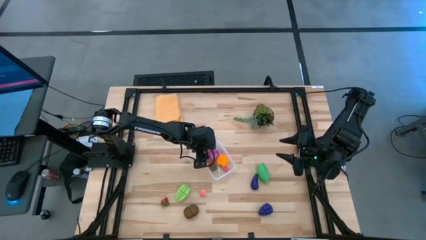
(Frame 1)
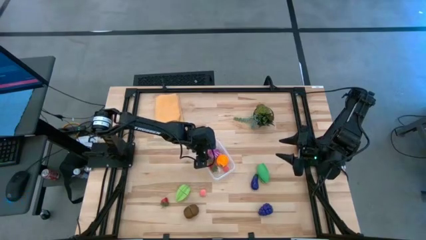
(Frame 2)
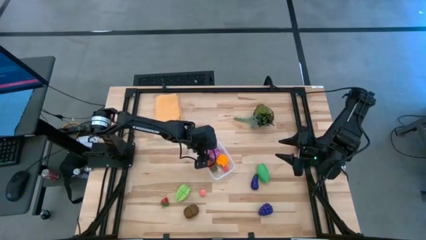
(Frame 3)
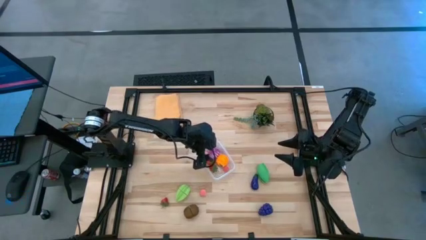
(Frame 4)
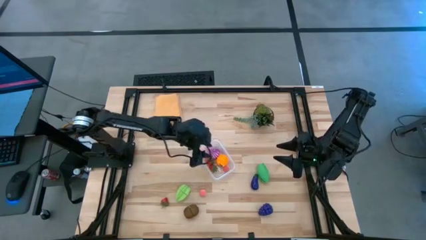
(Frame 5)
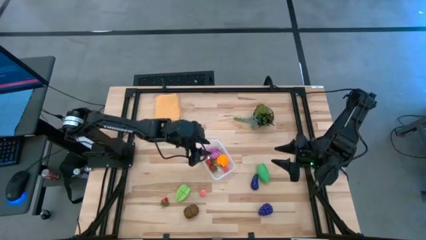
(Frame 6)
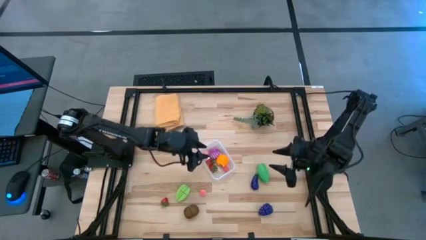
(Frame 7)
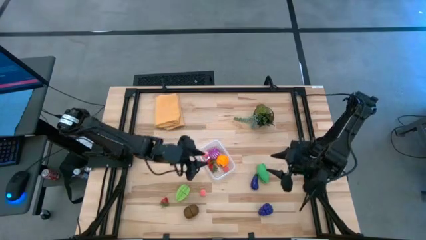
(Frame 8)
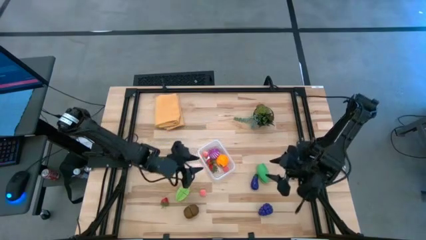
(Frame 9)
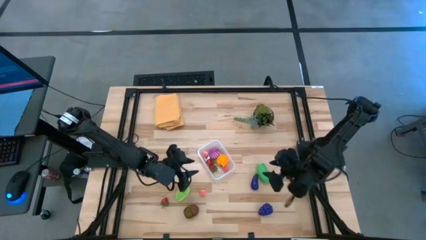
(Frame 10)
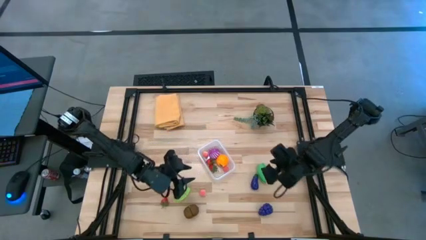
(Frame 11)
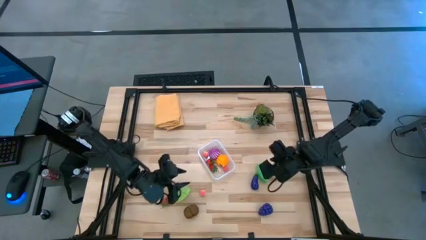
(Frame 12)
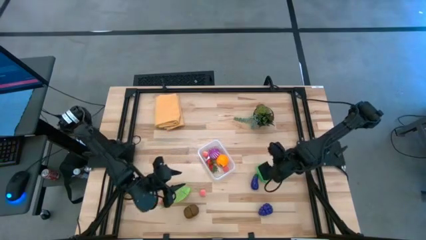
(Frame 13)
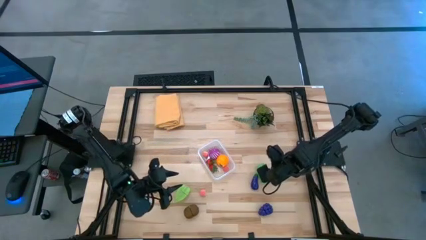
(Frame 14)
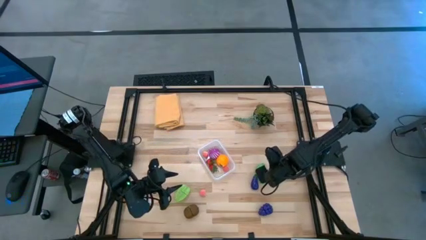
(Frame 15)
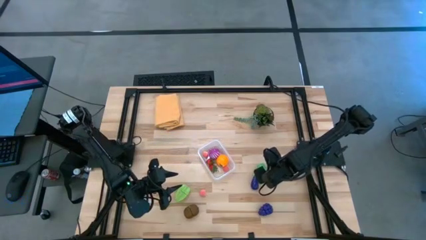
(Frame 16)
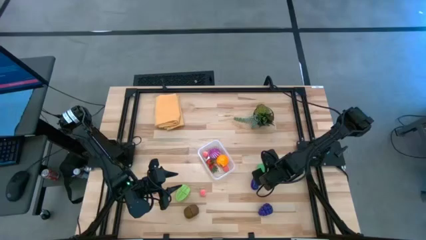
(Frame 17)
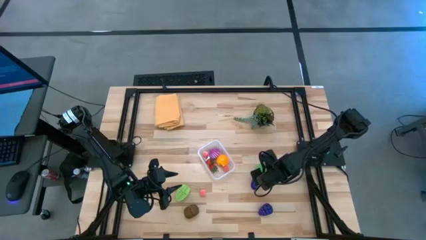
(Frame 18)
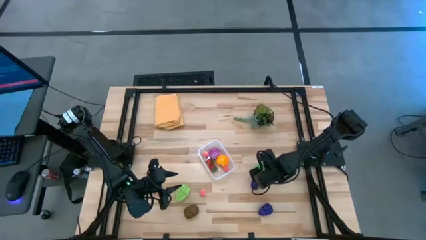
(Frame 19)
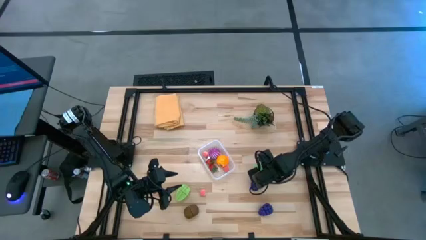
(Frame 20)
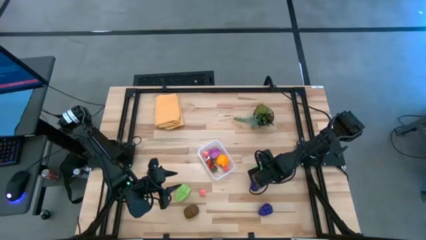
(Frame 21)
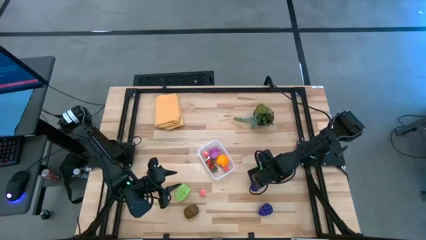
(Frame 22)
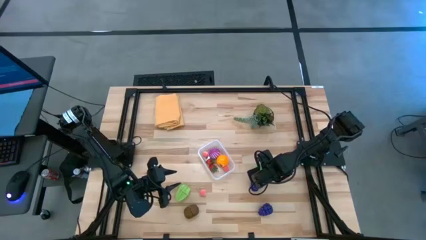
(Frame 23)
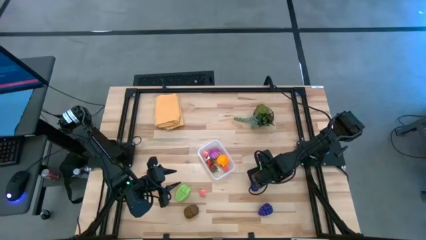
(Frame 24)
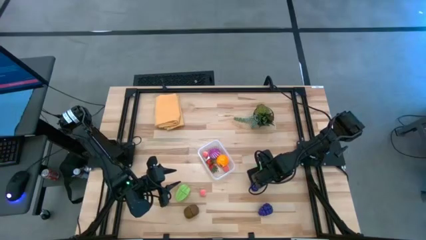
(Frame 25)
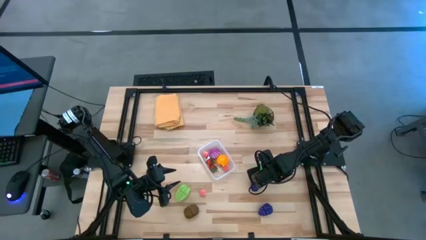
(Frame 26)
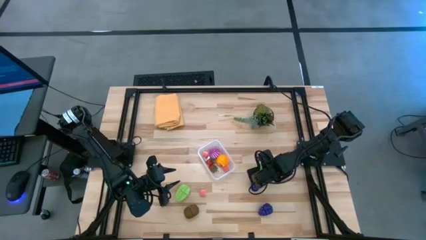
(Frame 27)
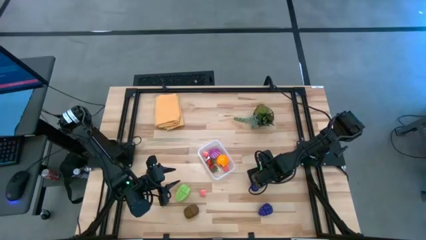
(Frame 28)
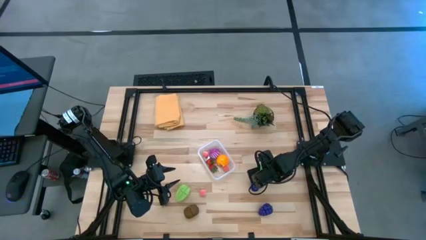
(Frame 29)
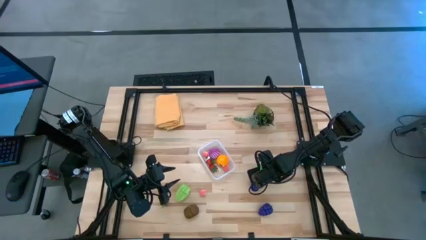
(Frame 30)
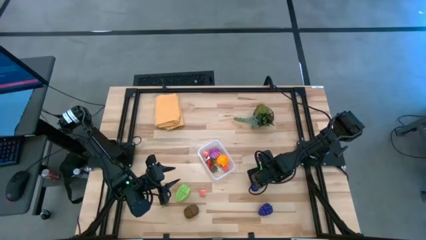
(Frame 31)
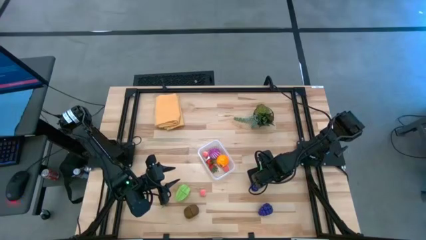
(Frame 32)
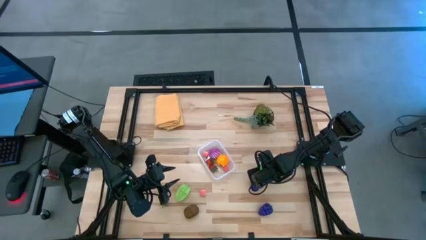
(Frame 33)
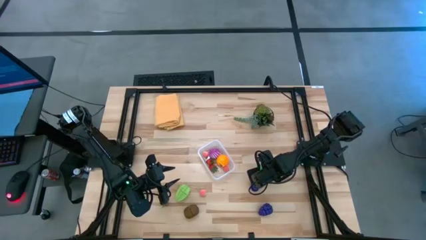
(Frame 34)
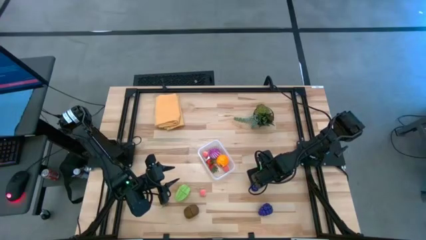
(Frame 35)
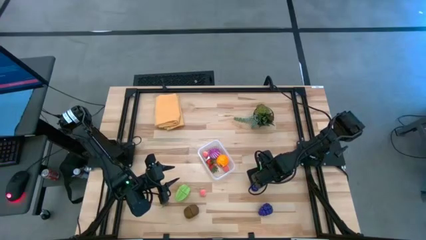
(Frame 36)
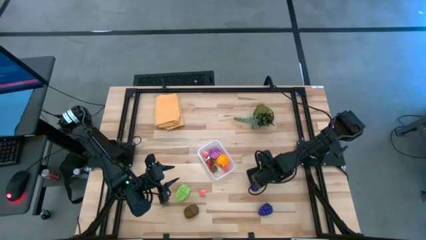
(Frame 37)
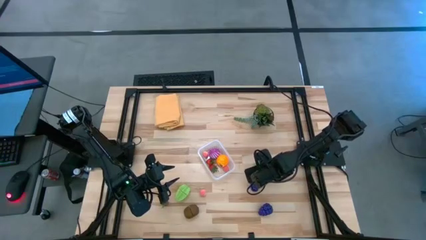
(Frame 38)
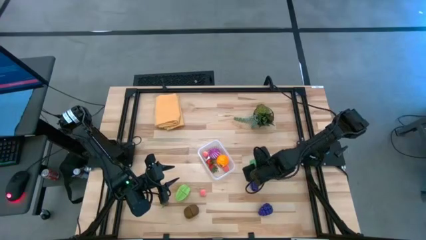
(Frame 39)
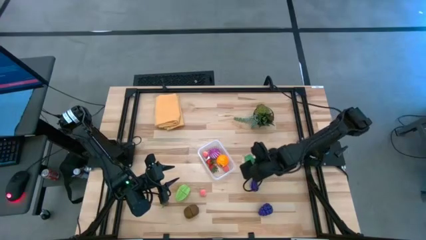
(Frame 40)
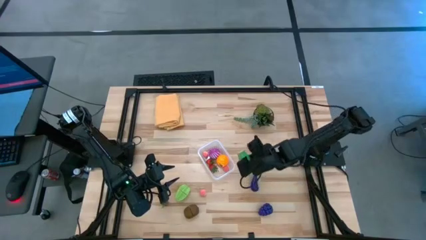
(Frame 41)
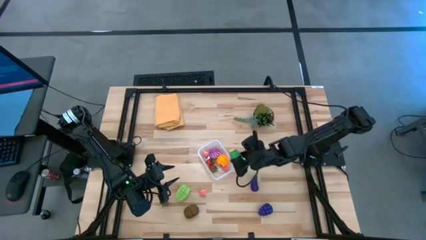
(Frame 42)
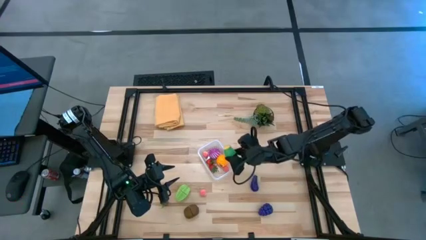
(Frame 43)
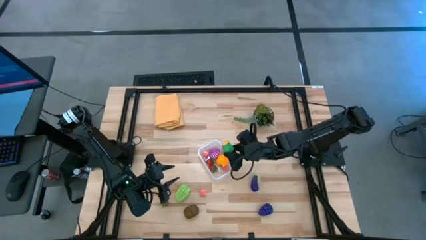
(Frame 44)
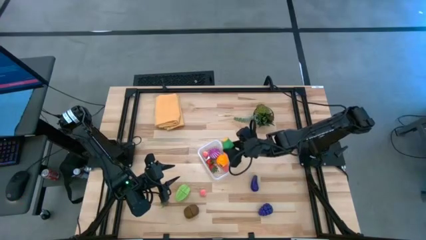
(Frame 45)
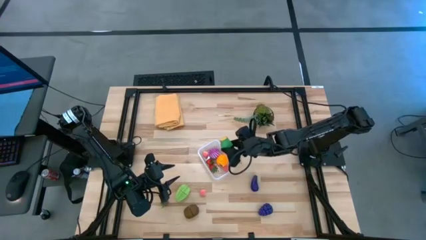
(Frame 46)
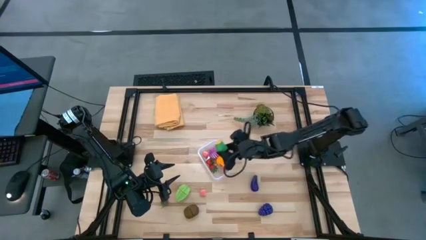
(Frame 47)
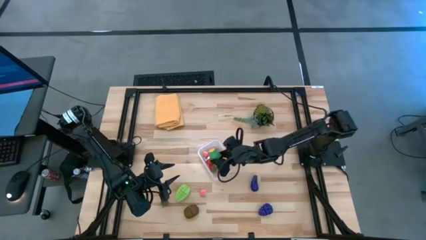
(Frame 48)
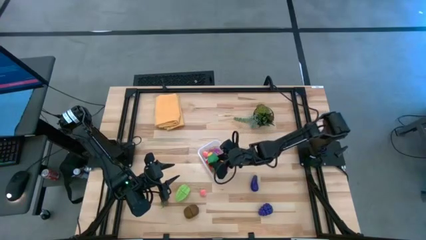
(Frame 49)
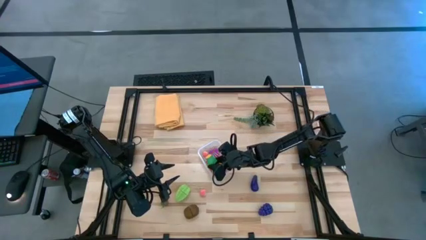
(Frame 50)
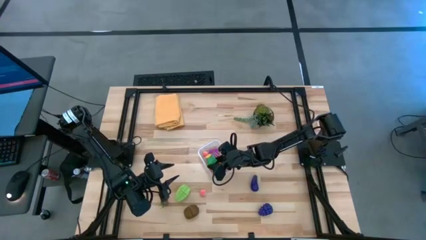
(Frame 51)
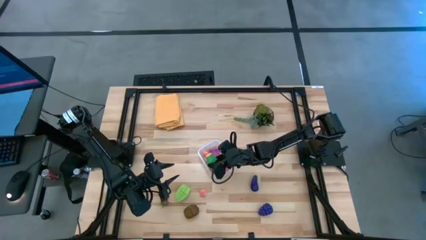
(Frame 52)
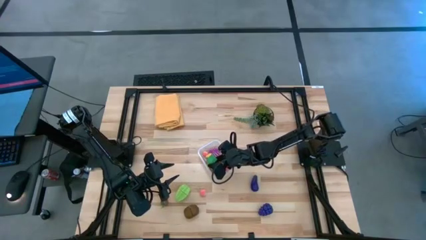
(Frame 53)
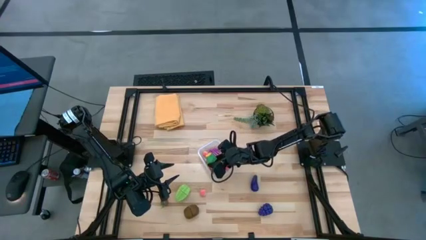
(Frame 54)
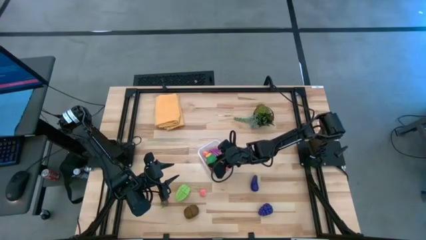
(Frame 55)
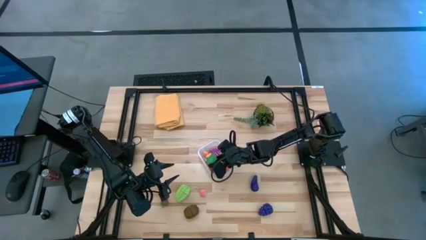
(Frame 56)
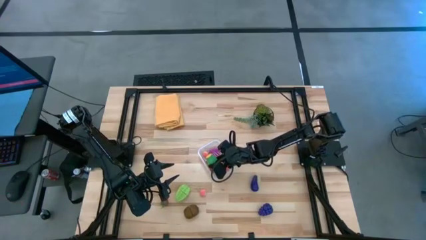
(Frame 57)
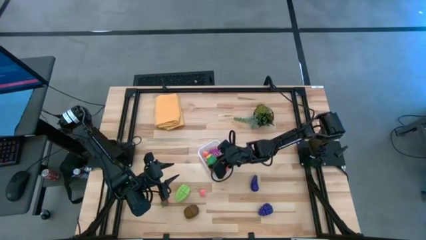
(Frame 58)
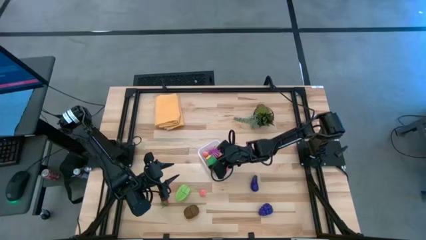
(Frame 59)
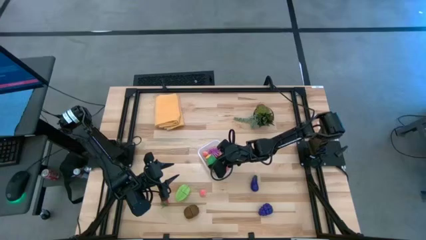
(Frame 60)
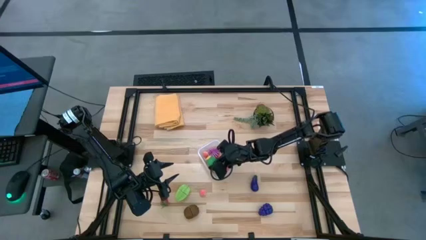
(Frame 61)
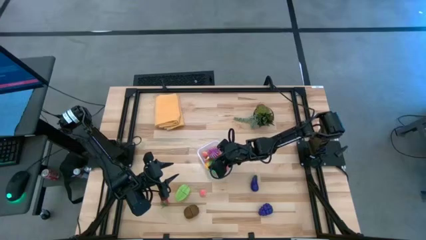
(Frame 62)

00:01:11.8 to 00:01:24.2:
Task: Pick and placing Produce into tupperware
Put the green corn into the transparent bin
